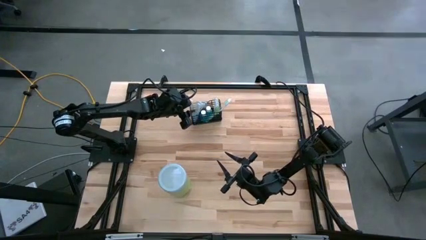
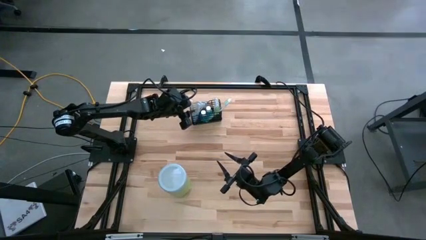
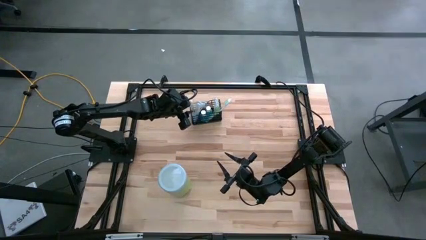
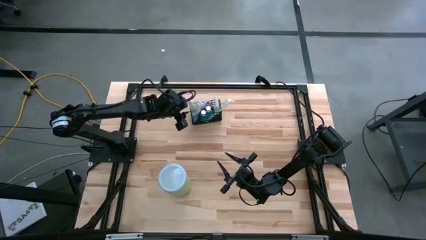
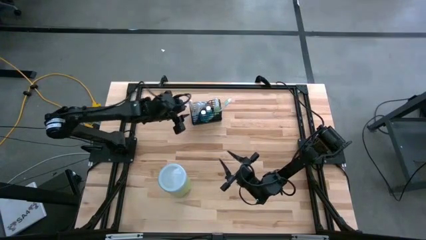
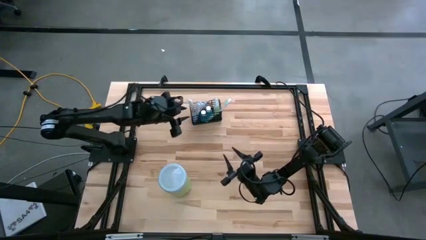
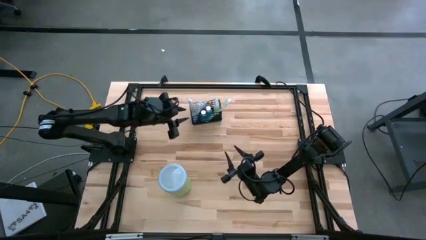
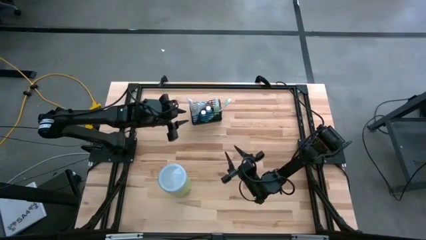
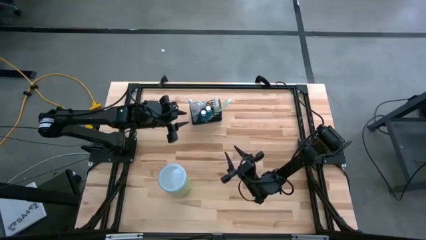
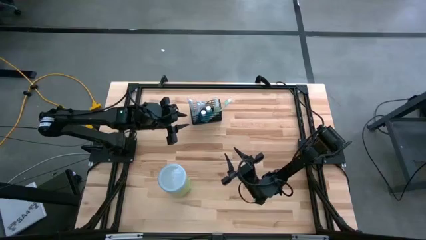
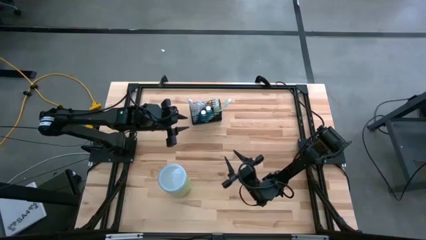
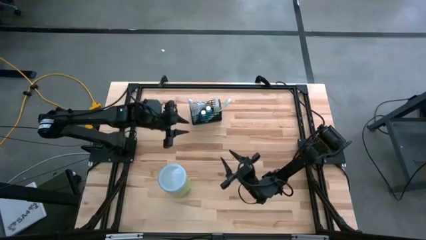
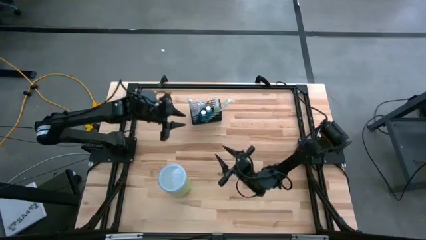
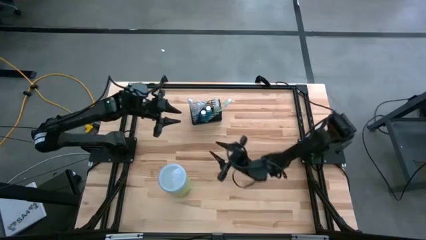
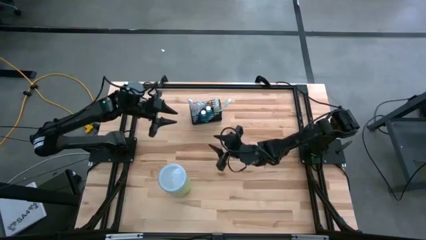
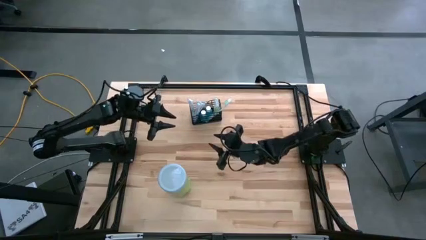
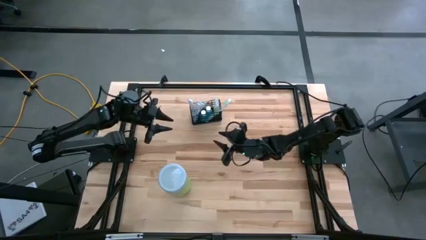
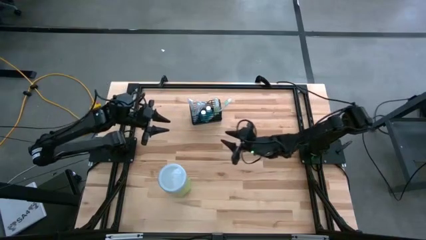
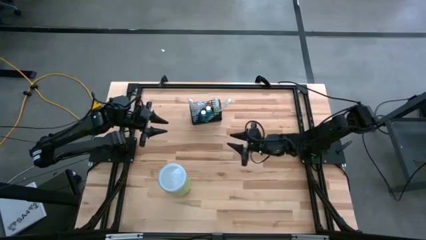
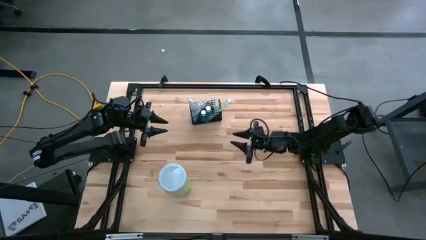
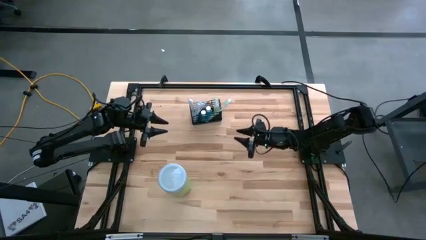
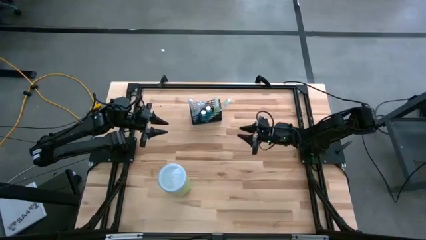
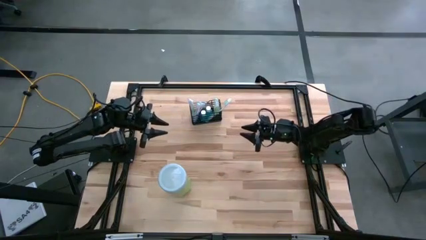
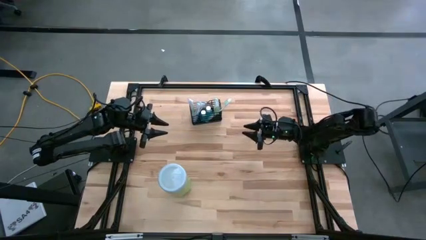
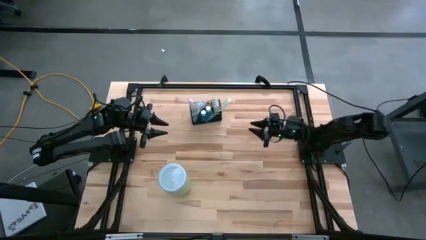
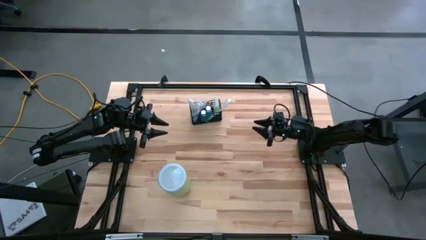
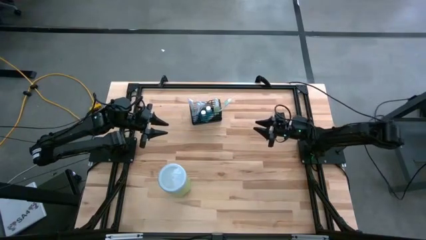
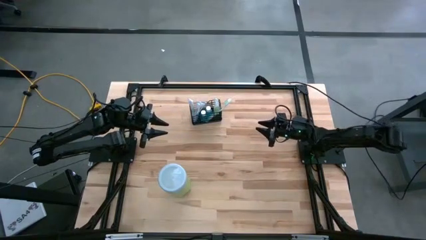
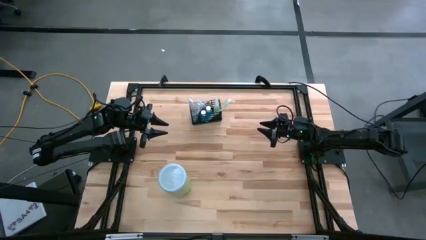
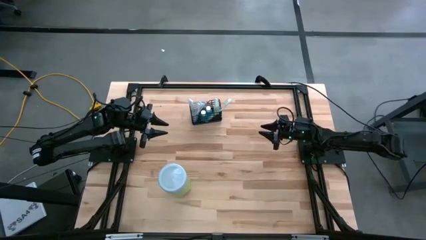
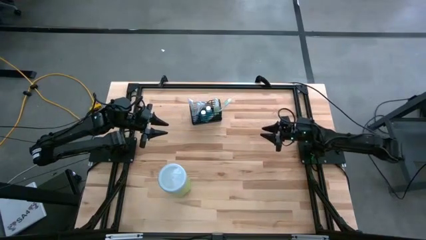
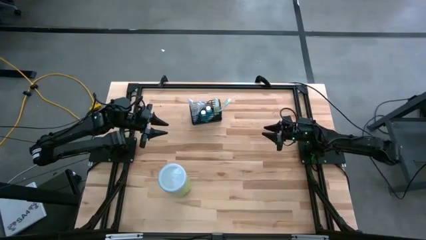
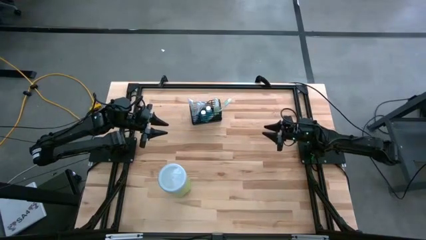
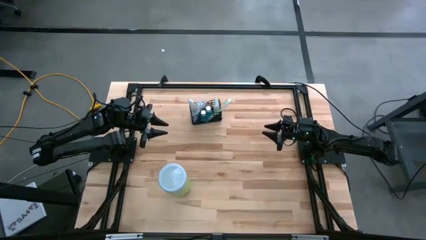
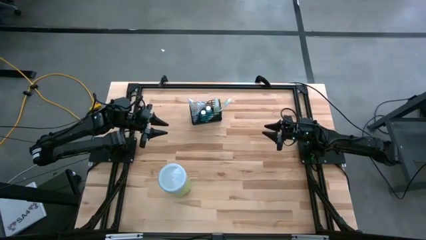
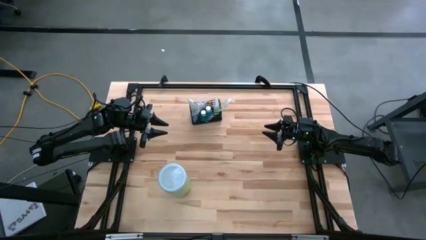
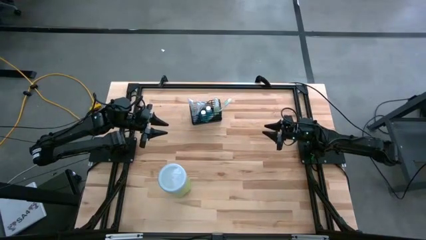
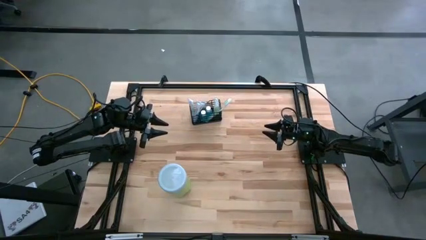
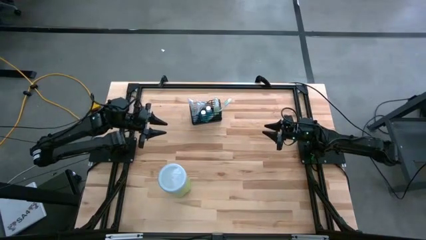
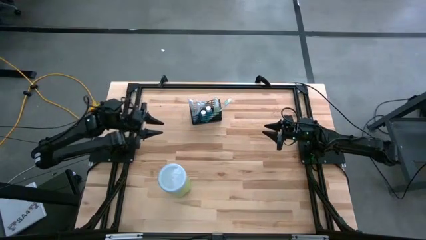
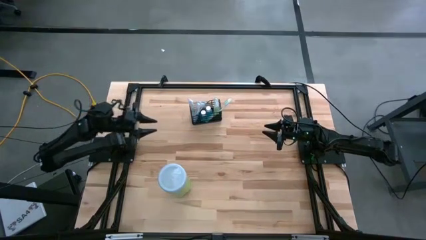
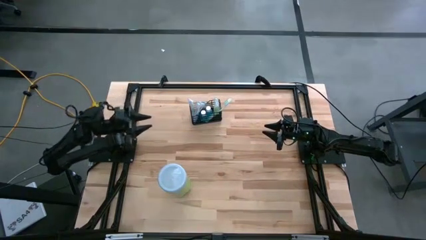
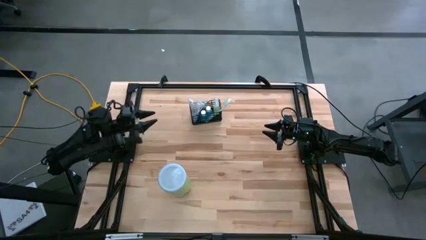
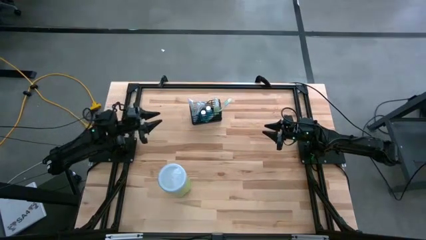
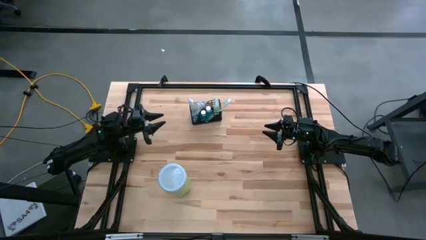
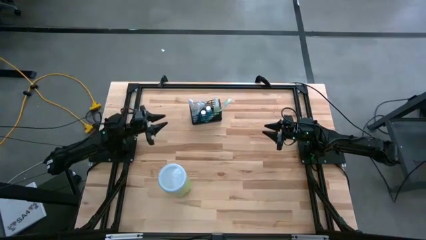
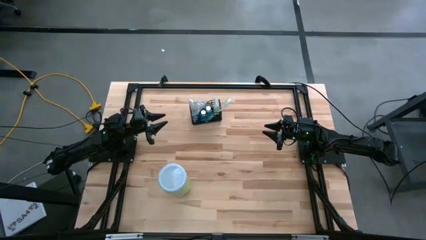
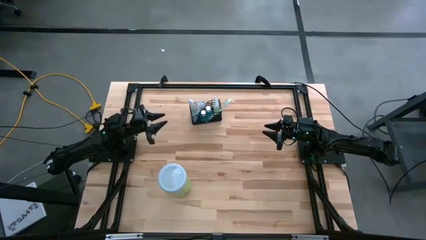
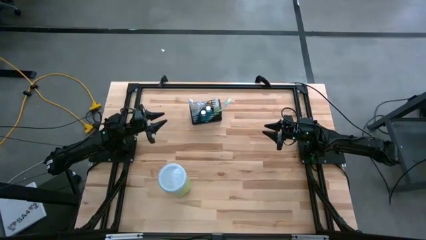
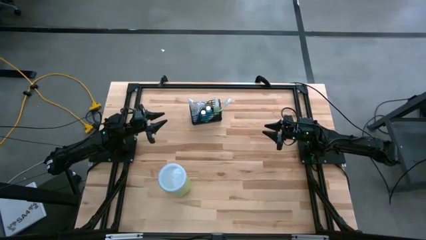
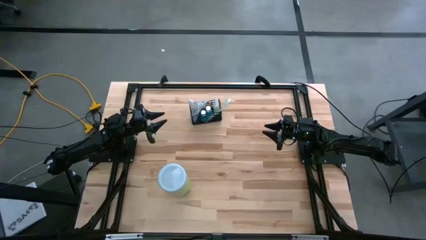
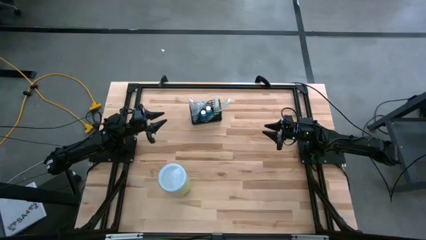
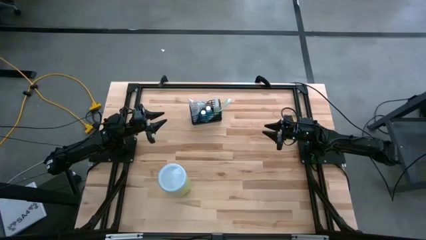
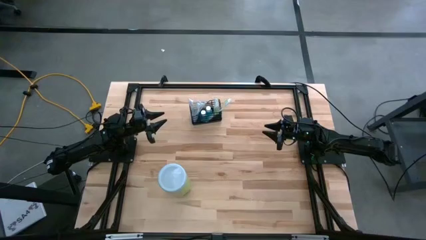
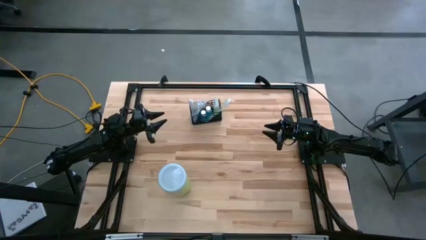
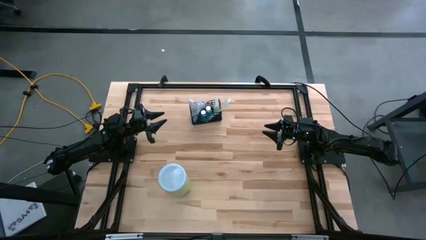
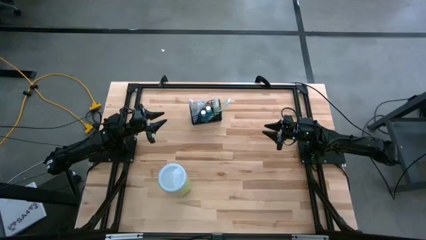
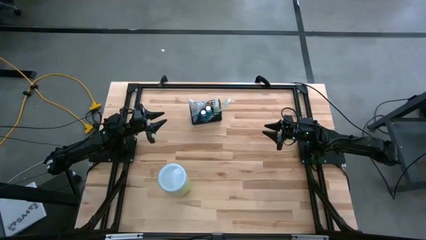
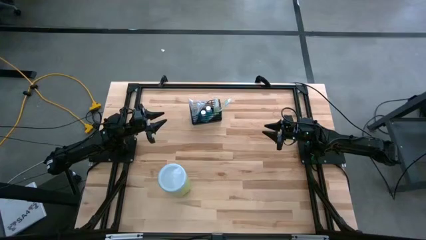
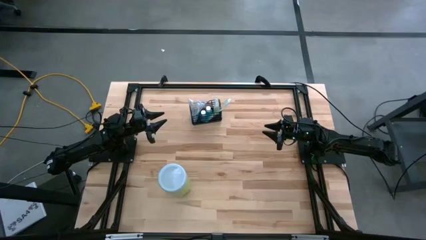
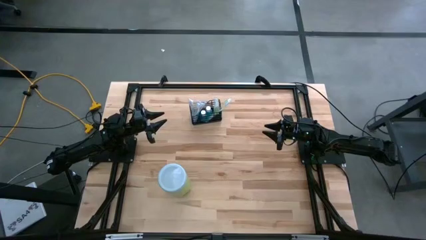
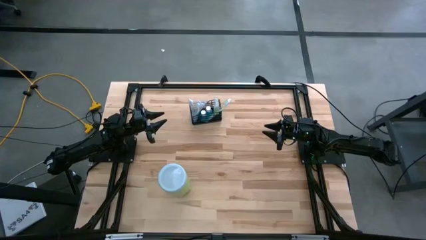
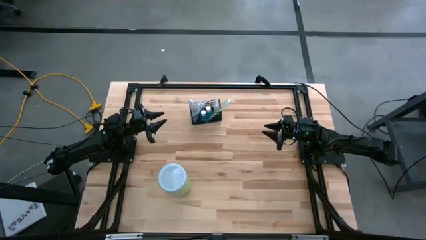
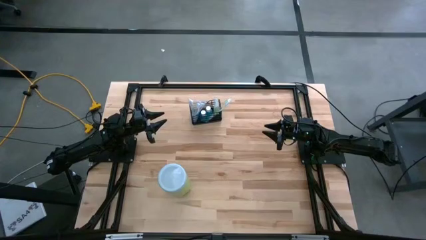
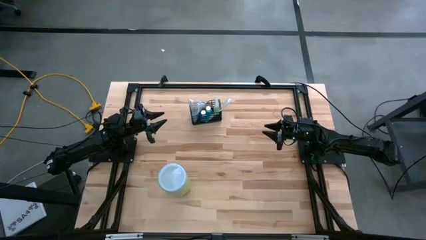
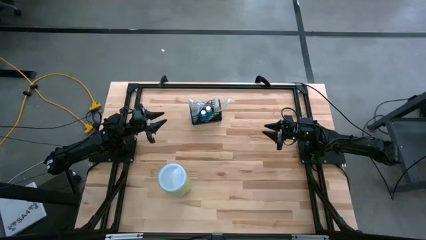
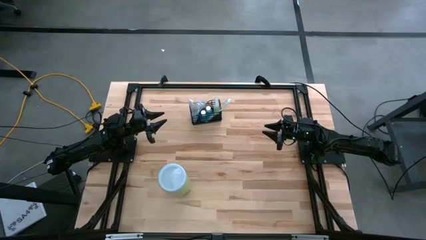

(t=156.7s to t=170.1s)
Task: Pick & Place toothbrushing station
Return to Home Position

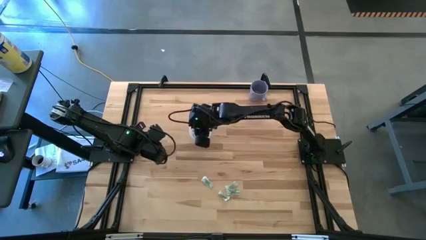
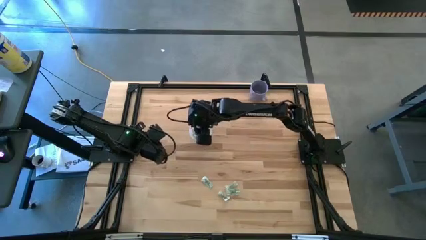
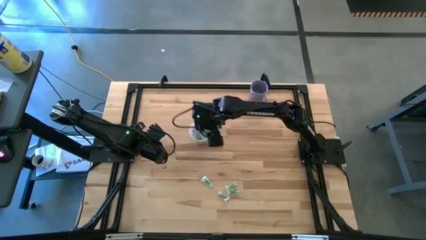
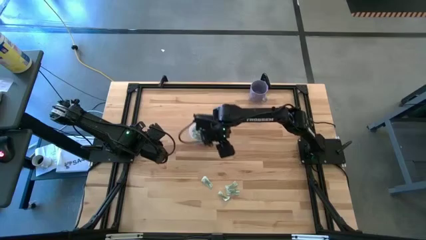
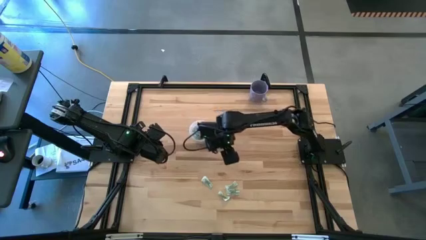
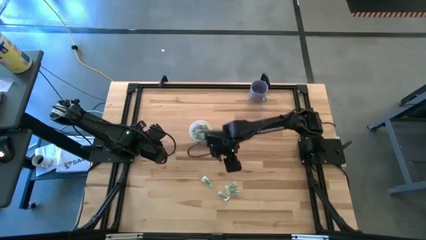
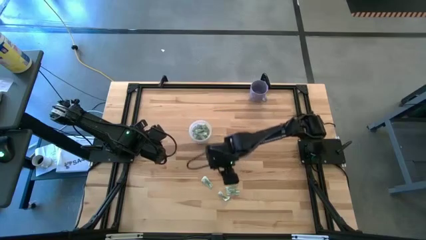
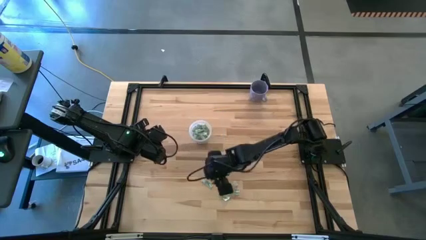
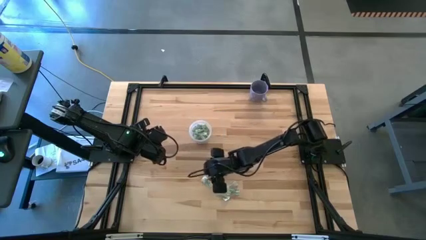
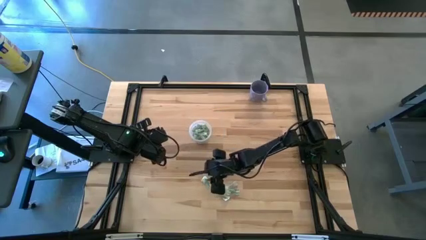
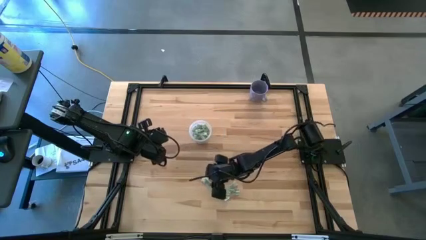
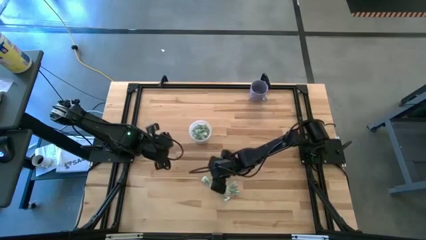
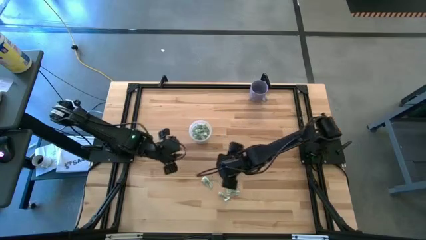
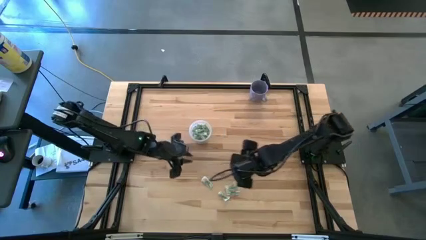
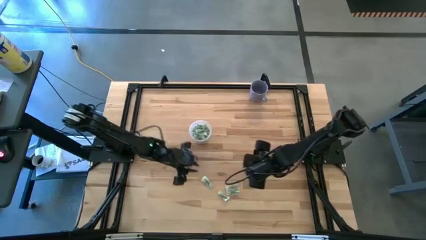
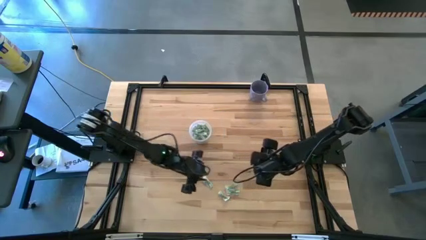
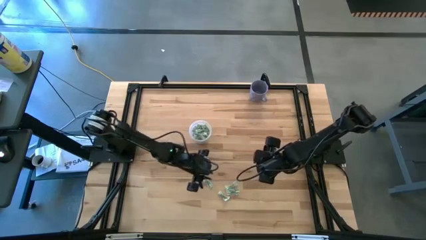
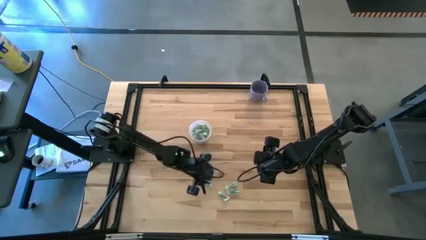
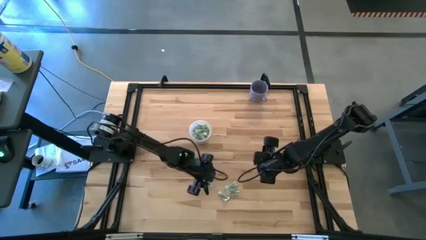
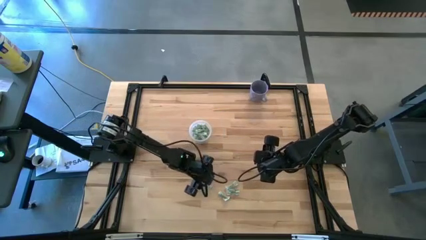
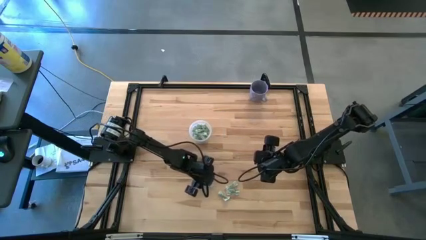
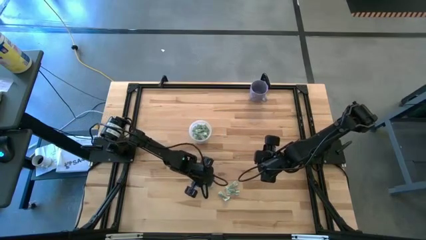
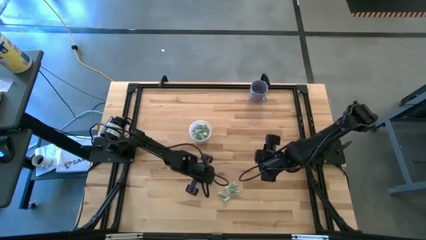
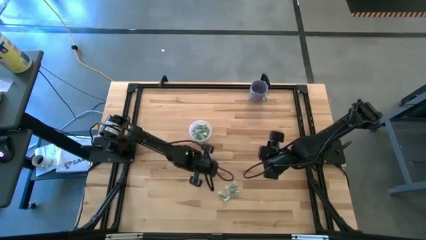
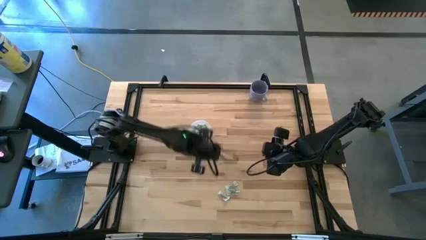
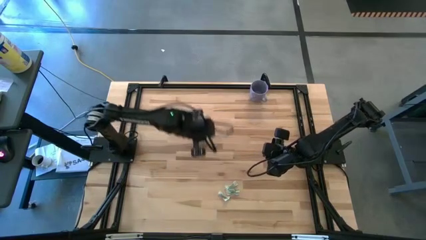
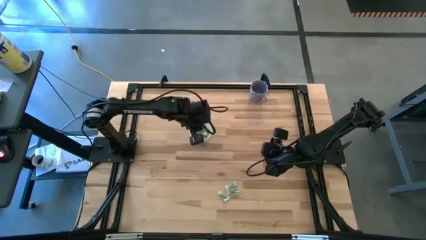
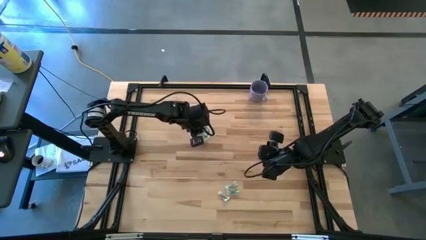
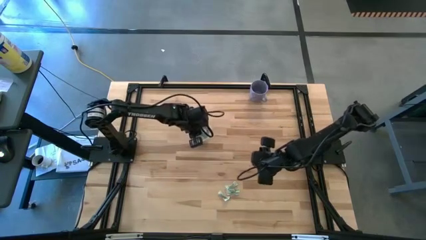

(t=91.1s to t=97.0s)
Task: Pick and place Stevia / Truvia into bins
Put the white stevia packet into the transparent container
